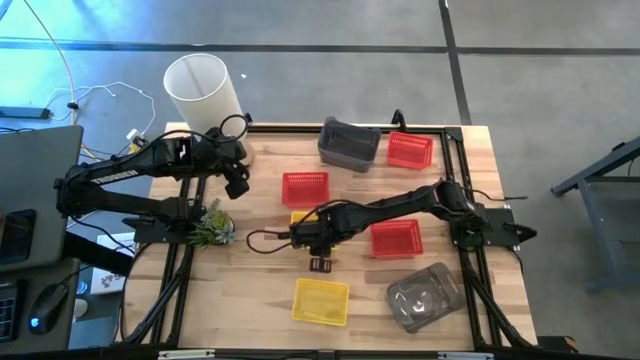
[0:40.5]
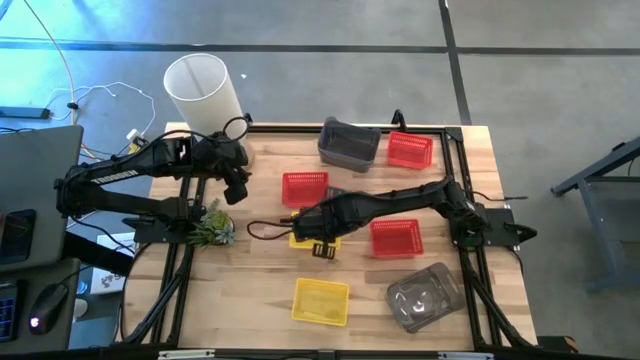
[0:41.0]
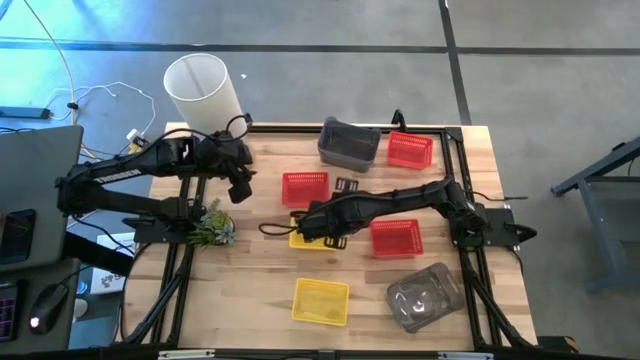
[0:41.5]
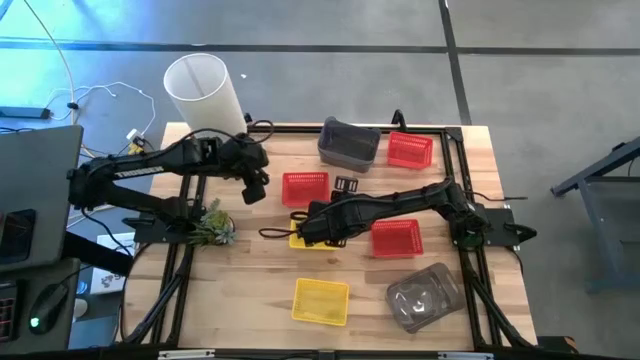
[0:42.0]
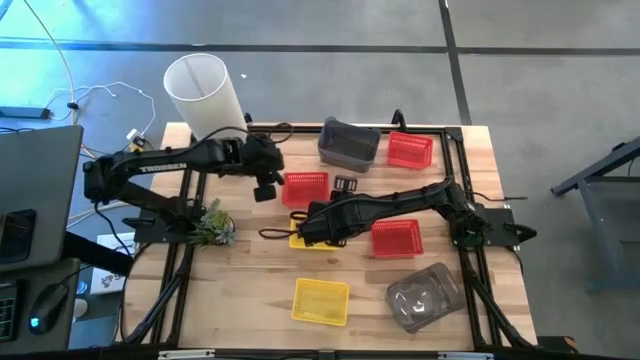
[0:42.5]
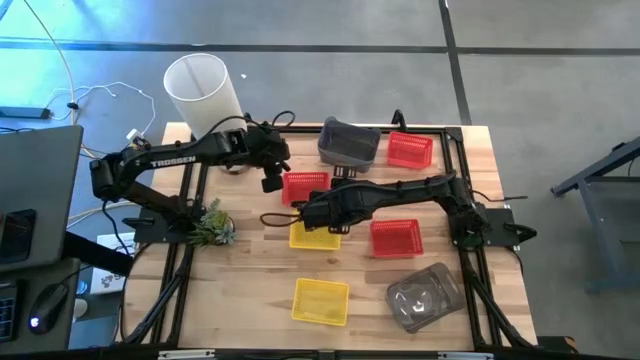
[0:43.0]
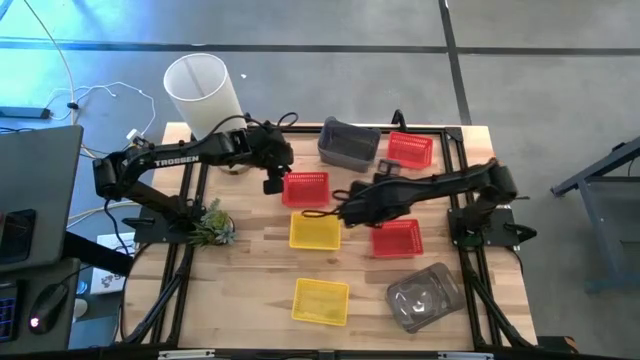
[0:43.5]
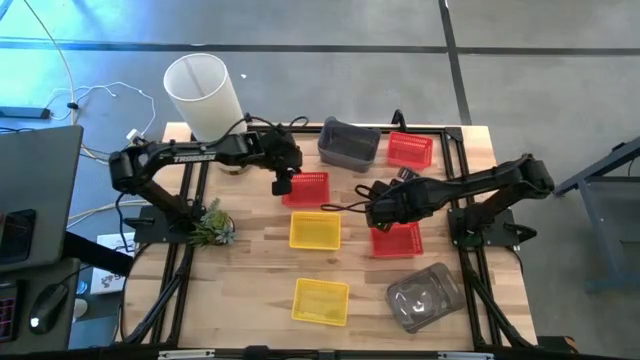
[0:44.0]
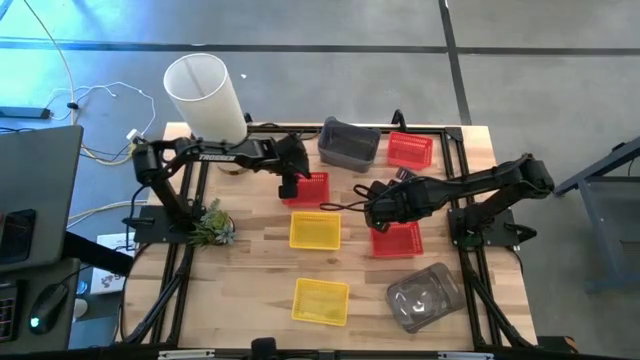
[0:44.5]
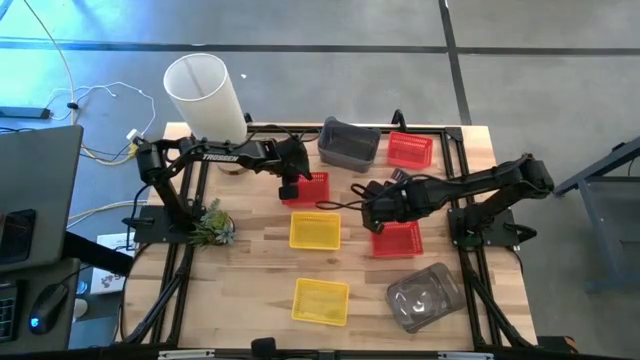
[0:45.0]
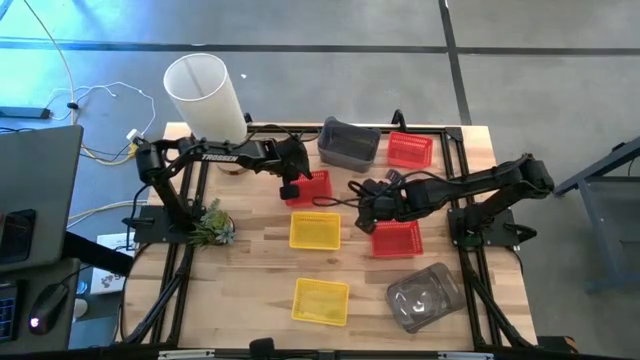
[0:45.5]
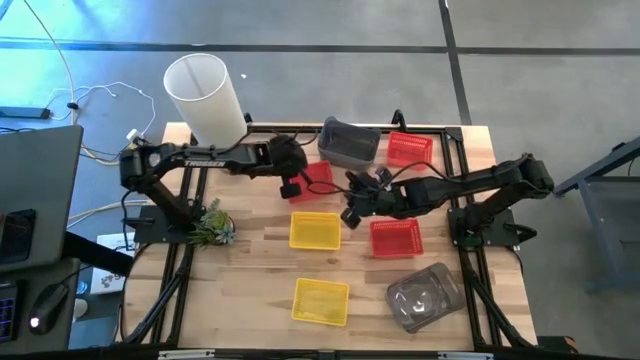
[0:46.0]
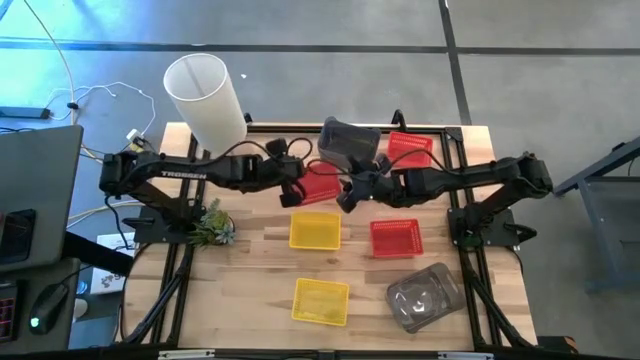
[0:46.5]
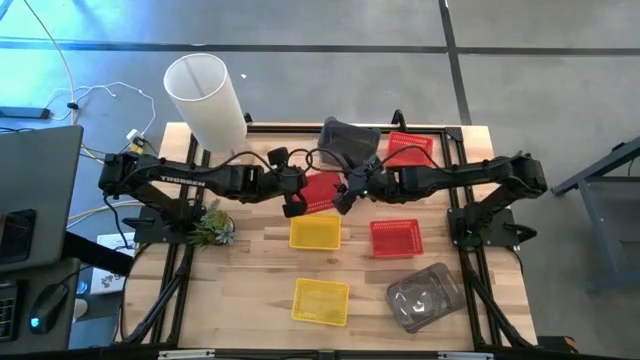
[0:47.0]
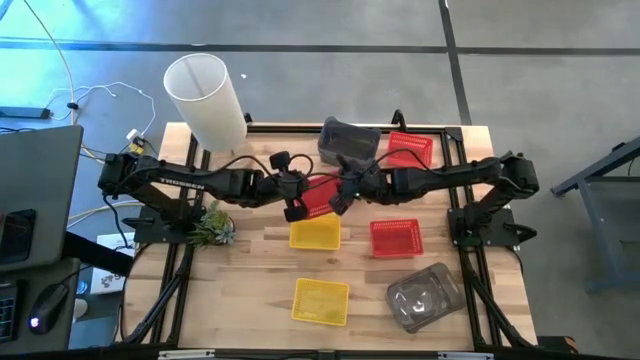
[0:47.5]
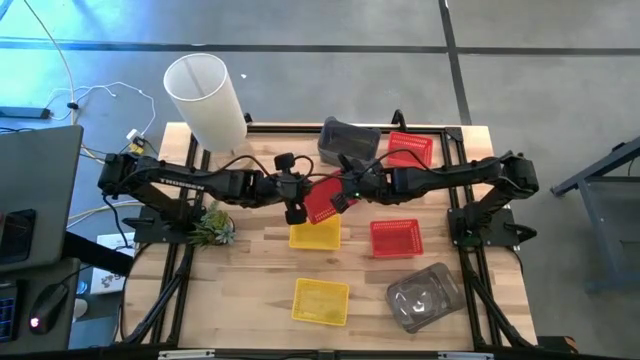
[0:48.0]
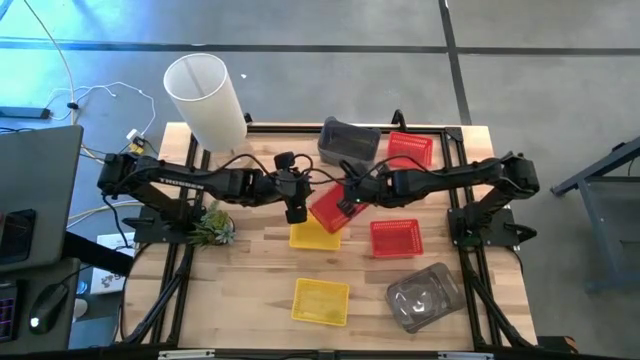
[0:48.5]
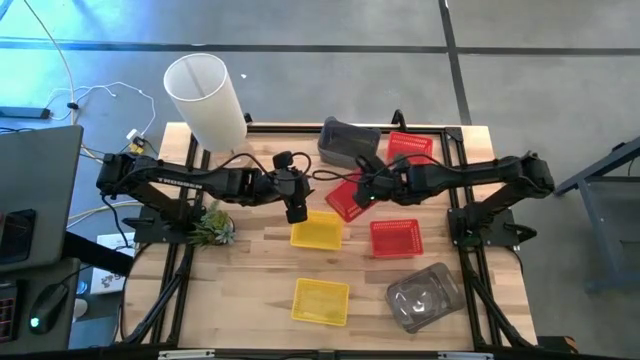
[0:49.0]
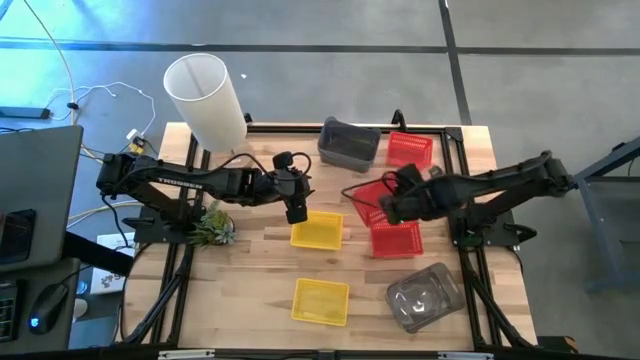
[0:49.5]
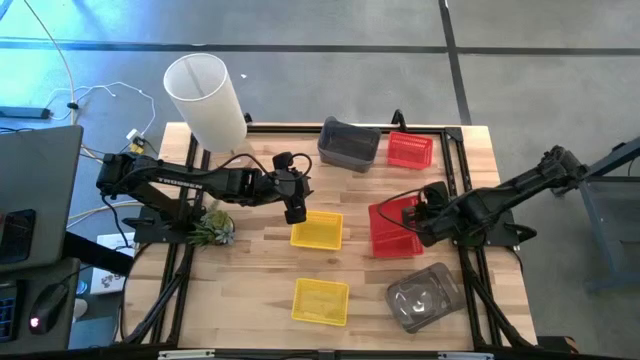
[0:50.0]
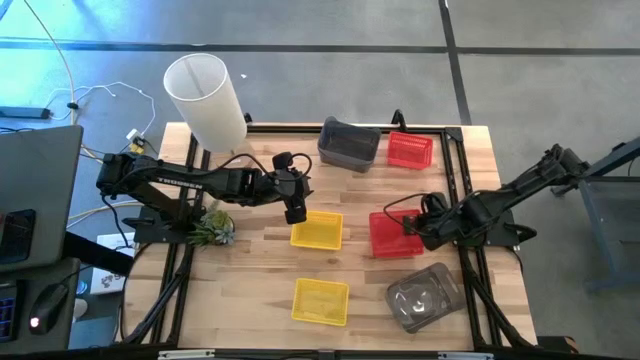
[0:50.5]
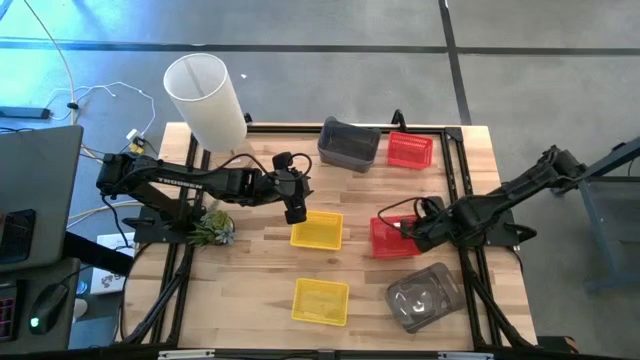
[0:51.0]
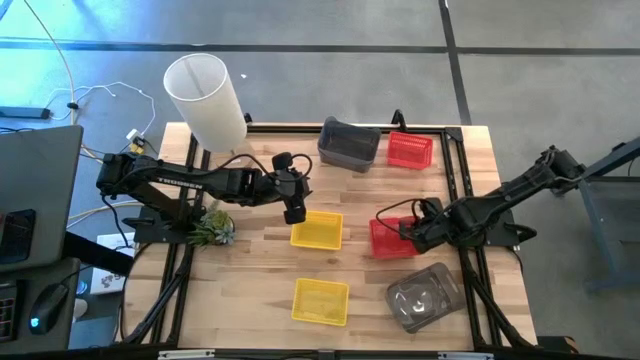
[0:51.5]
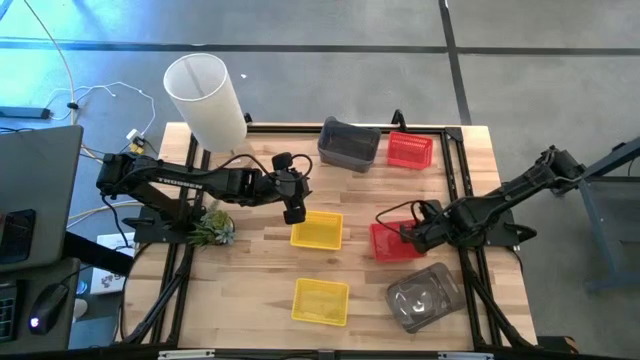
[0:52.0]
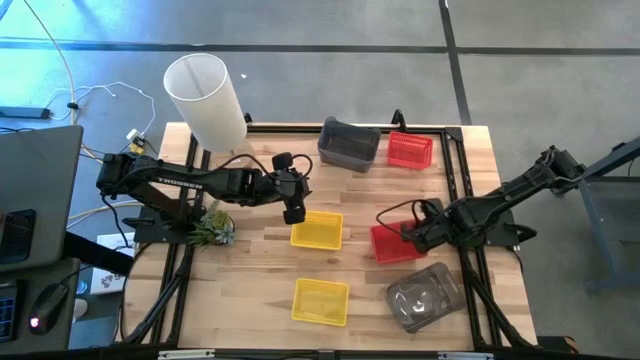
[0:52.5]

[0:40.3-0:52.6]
Stack the middle red bin on the bottom red bin

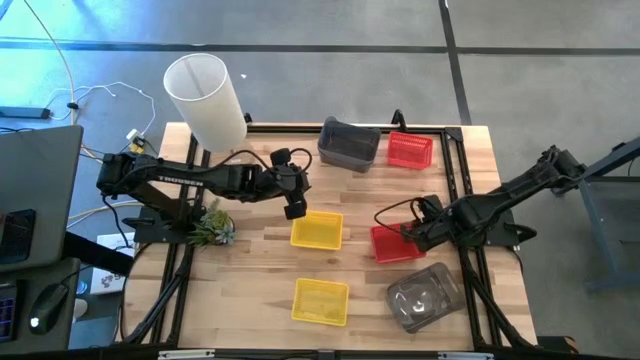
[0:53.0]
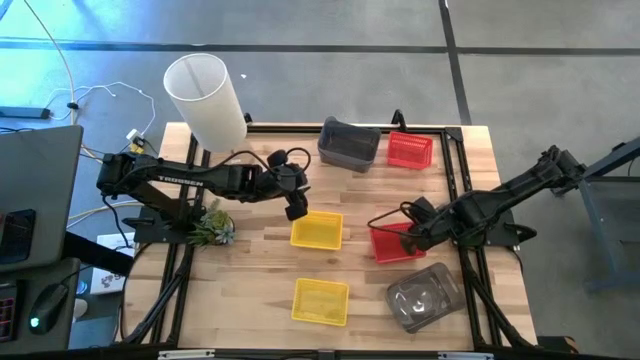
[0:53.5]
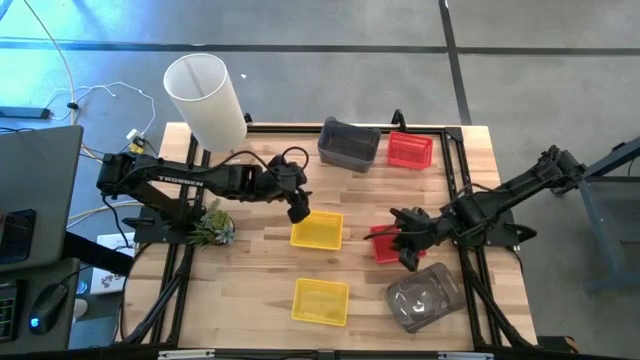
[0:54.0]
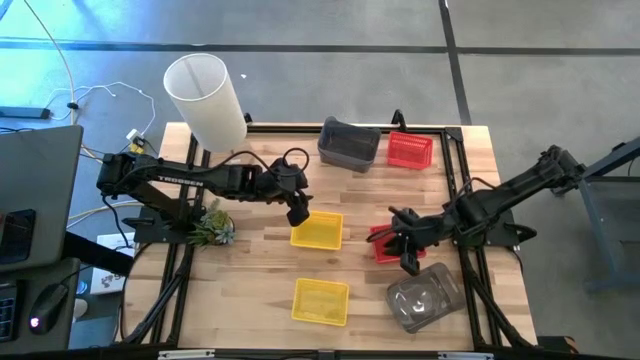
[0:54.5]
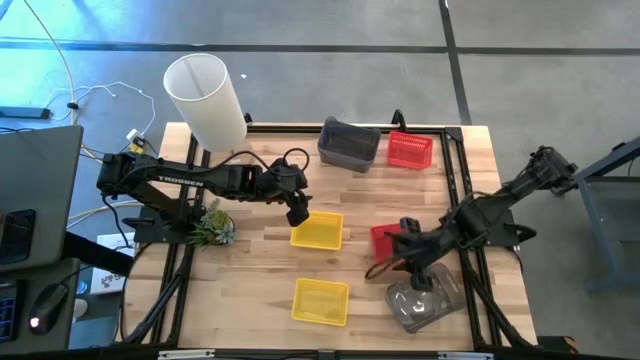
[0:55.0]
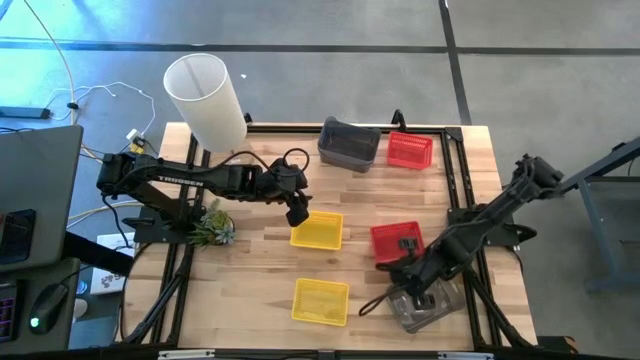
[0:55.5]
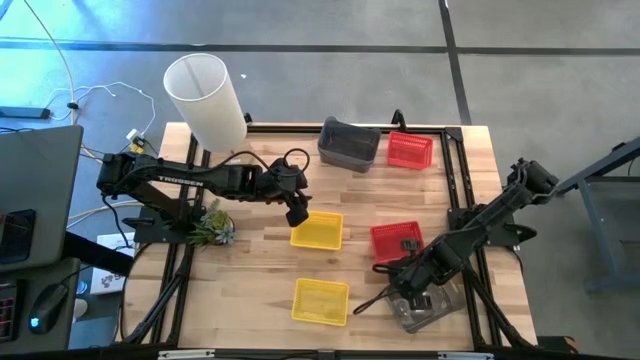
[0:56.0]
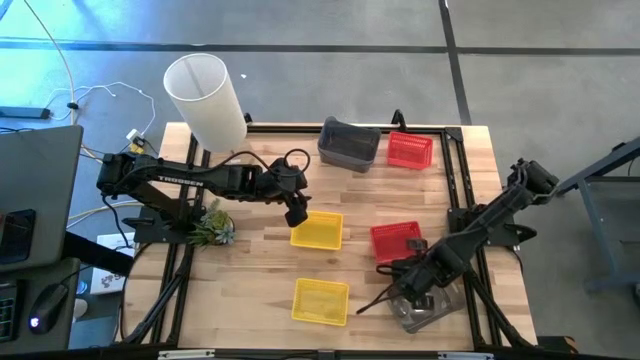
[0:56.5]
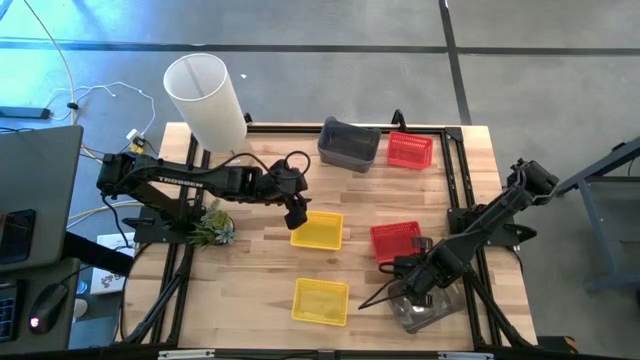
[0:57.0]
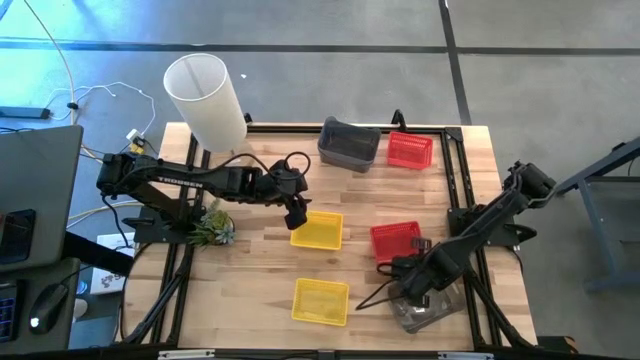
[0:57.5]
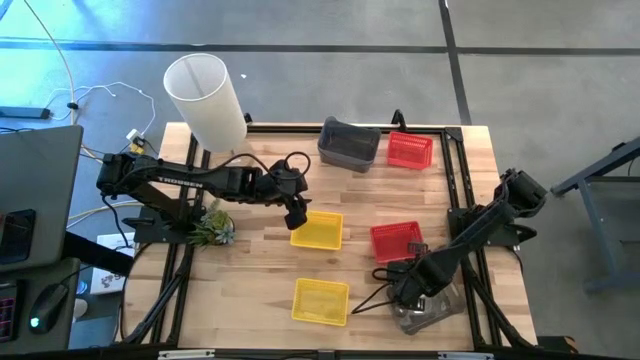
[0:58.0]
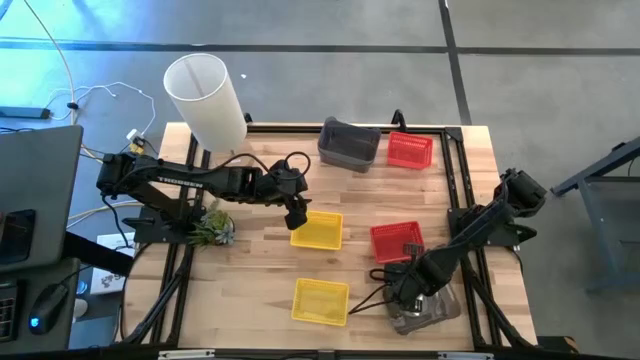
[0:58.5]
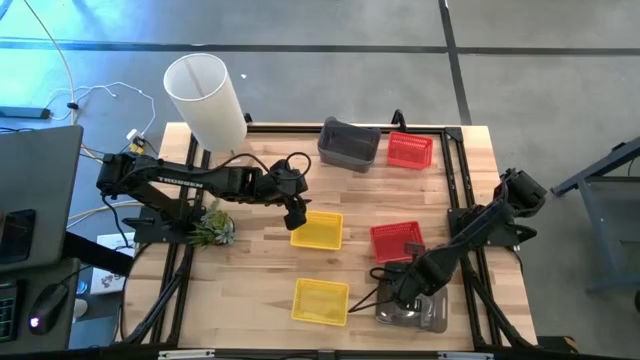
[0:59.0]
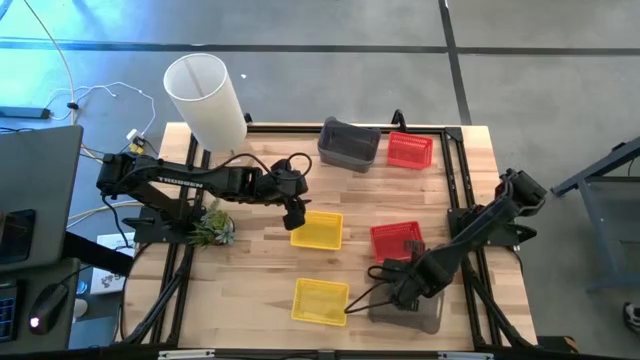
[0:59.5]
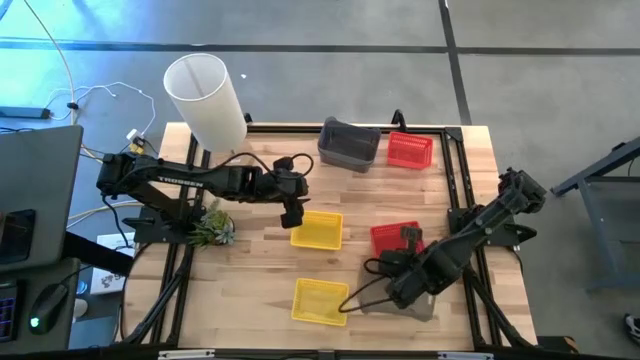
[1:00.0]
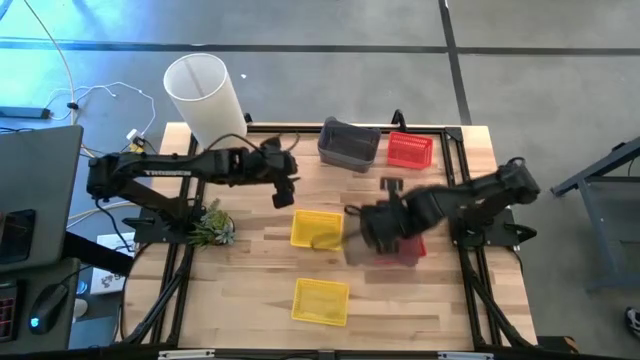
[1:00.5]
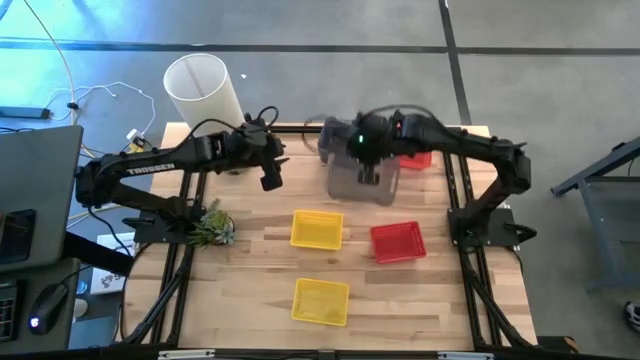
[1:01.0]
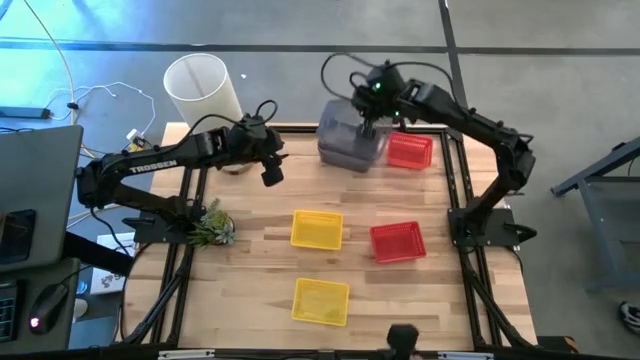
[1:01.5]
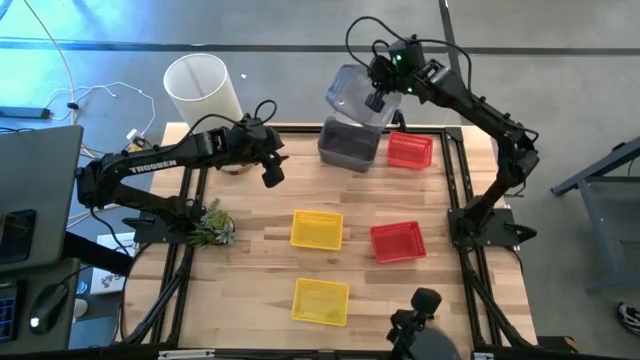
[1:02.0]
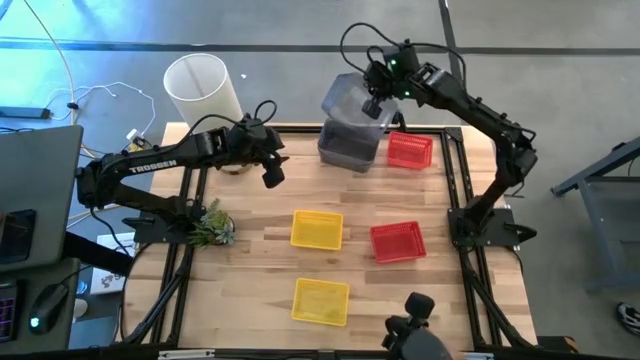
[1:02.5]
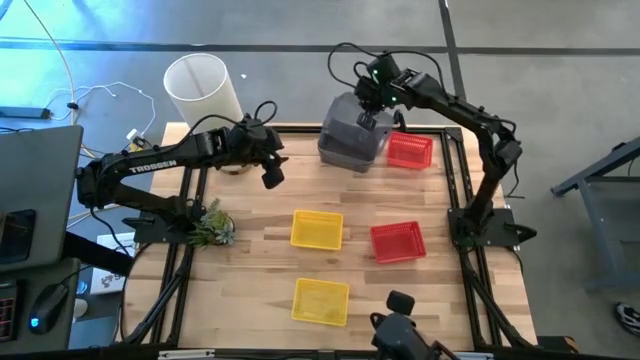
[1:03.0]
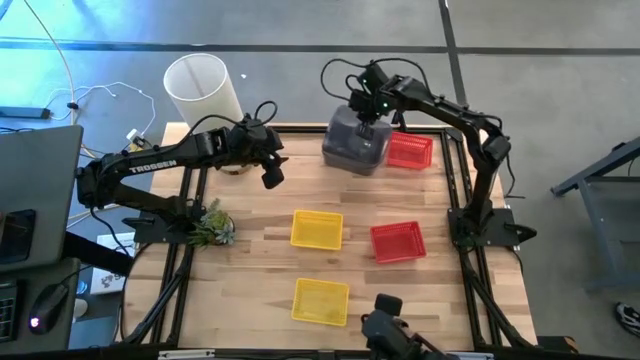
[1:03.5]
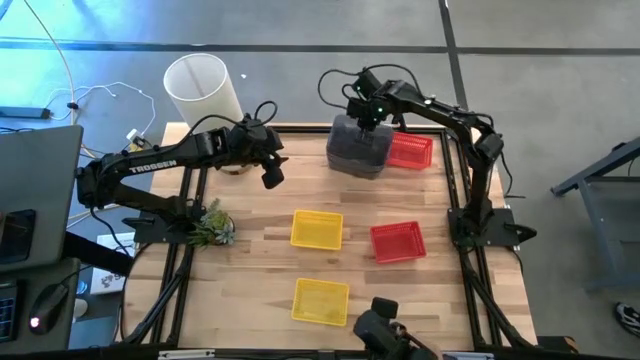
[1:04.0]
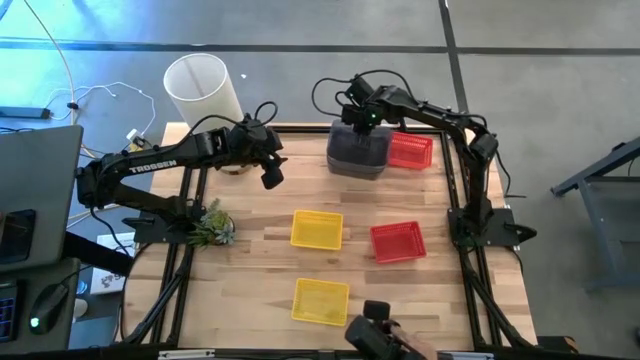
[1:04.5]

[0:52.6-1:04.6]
Stack the bottom black bin on the stacked black bin
